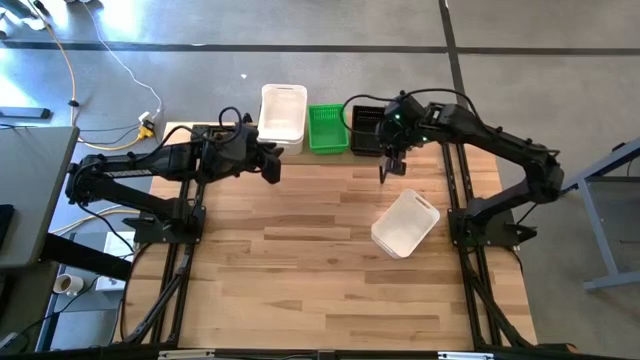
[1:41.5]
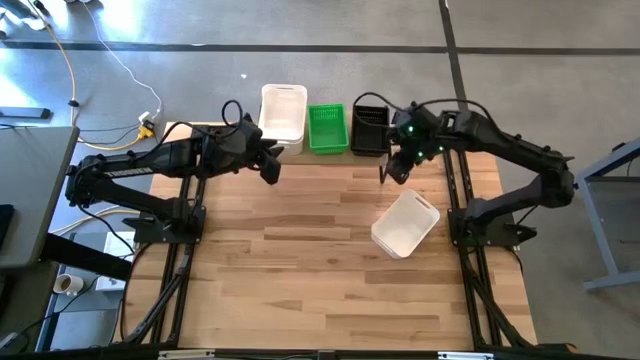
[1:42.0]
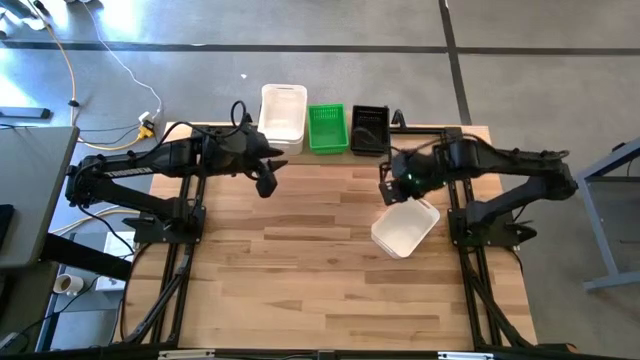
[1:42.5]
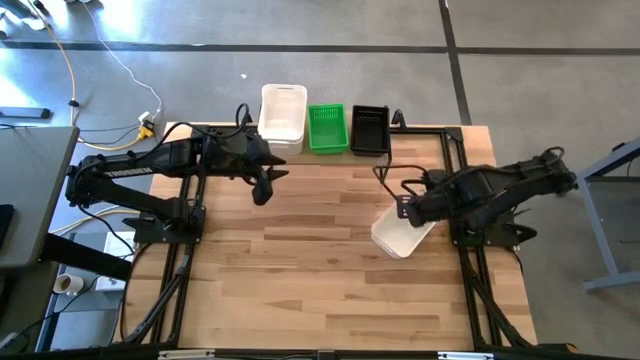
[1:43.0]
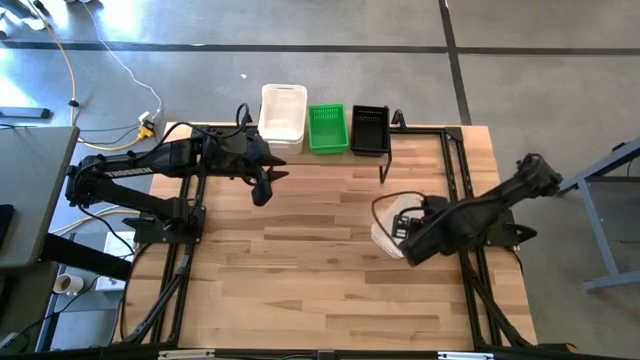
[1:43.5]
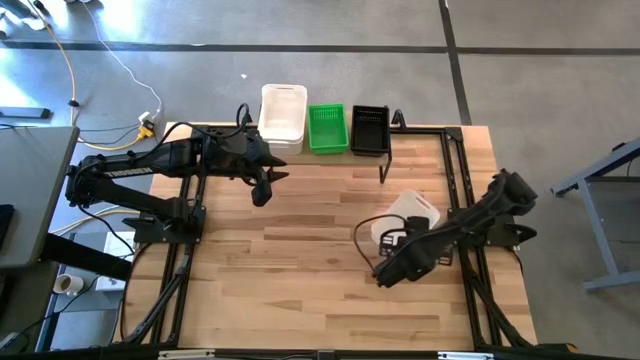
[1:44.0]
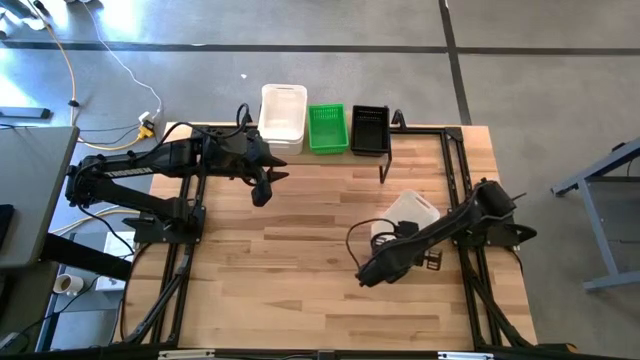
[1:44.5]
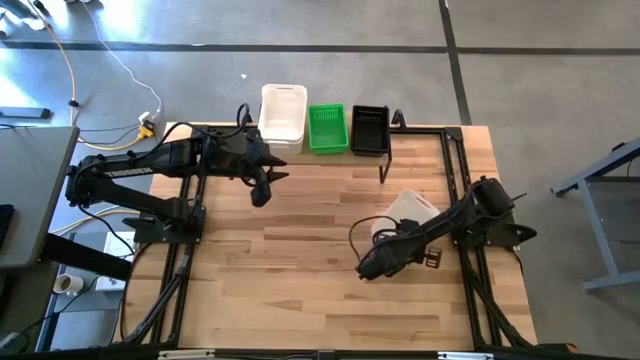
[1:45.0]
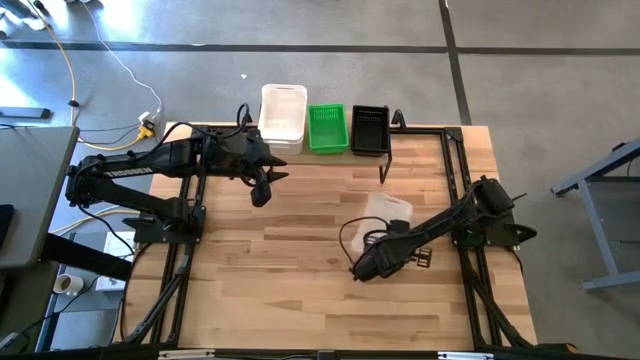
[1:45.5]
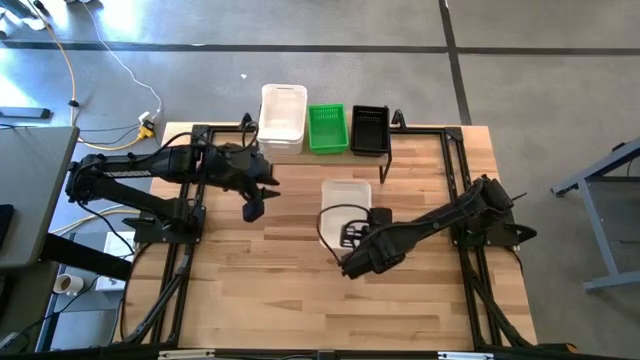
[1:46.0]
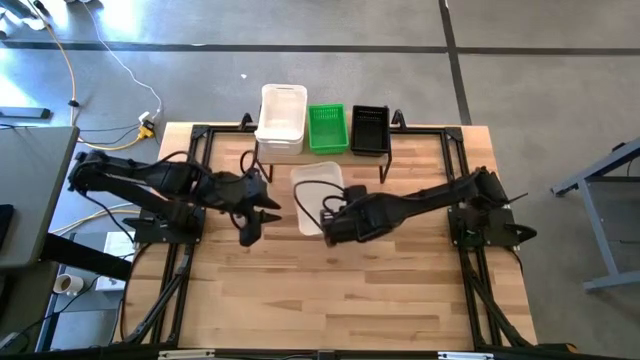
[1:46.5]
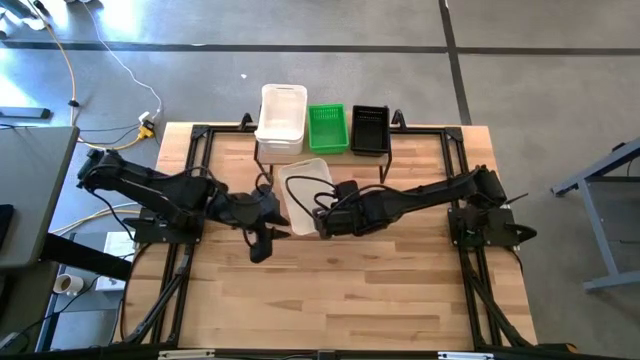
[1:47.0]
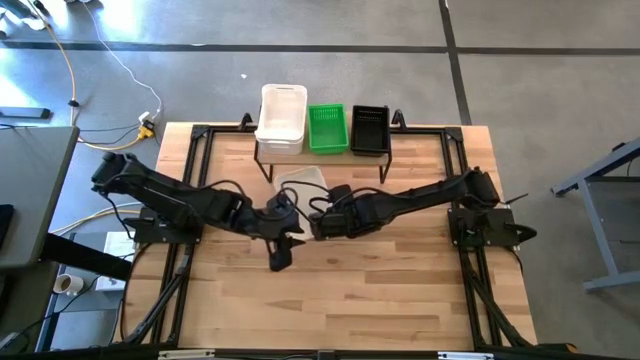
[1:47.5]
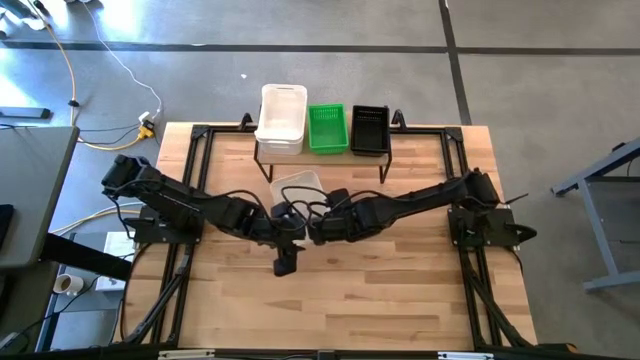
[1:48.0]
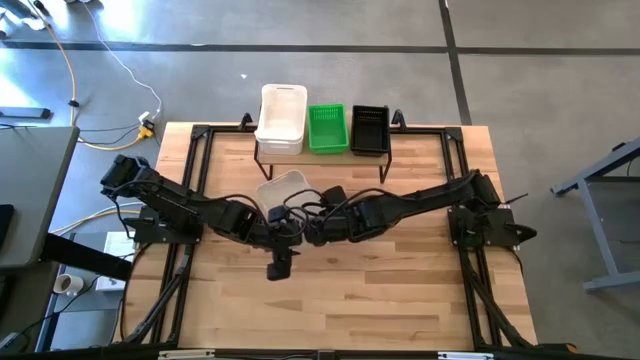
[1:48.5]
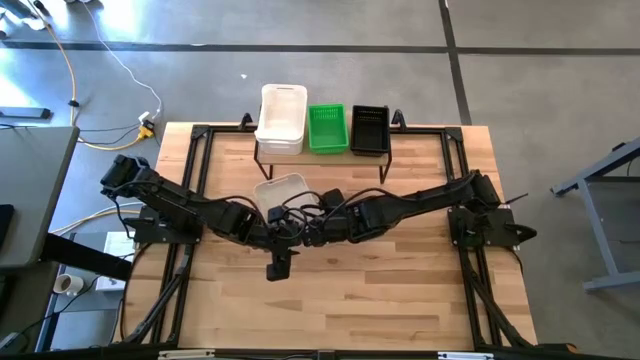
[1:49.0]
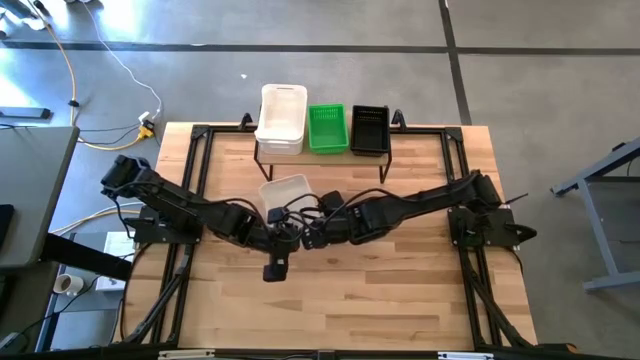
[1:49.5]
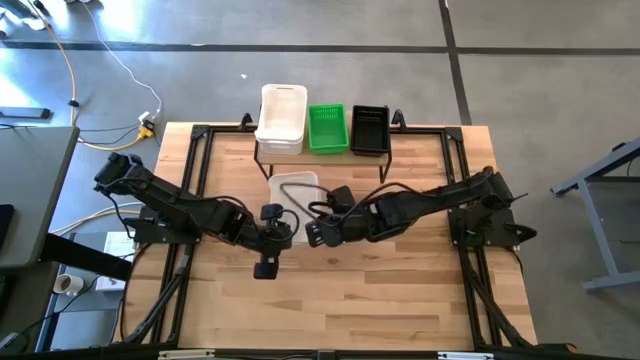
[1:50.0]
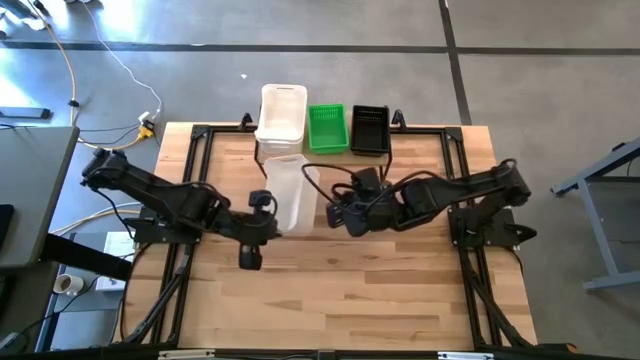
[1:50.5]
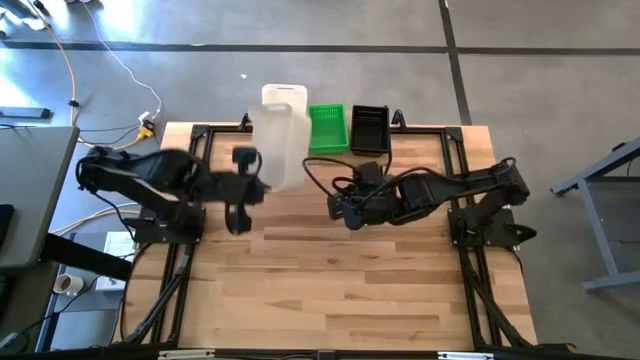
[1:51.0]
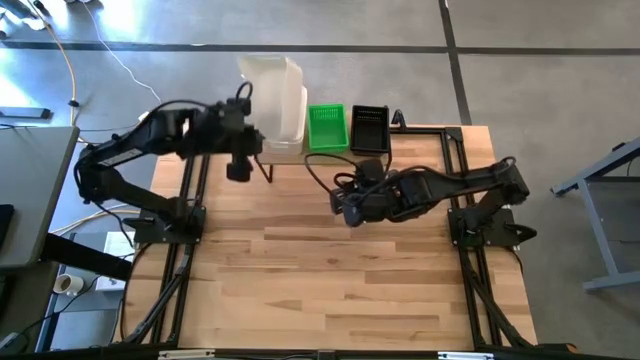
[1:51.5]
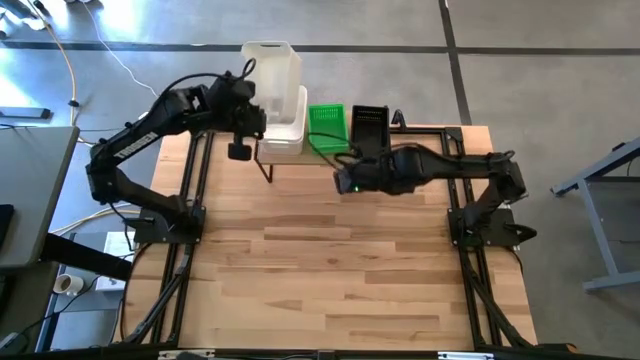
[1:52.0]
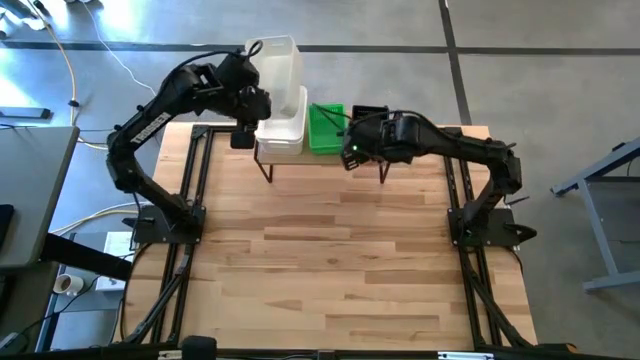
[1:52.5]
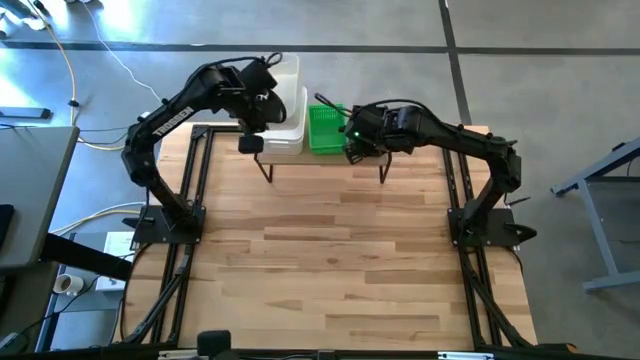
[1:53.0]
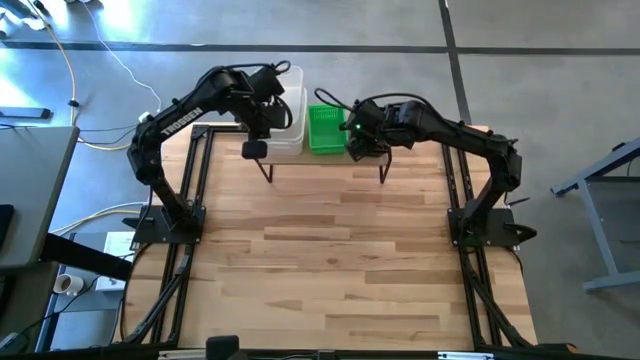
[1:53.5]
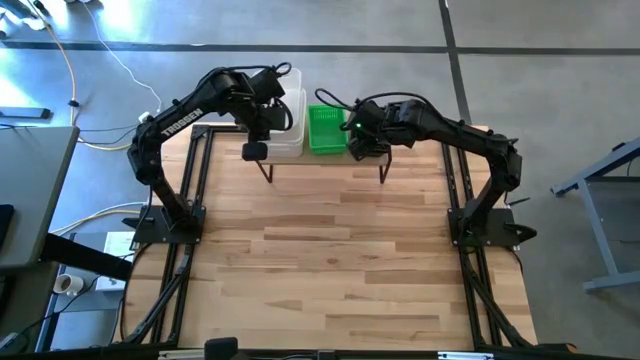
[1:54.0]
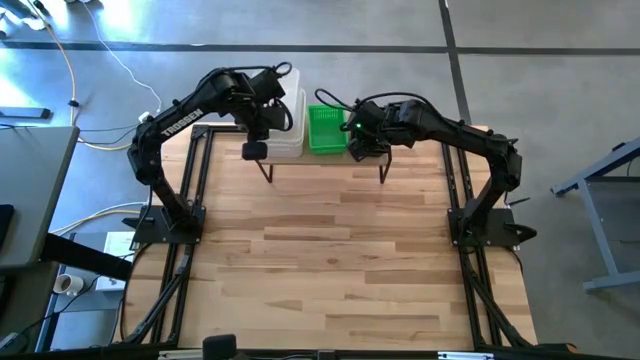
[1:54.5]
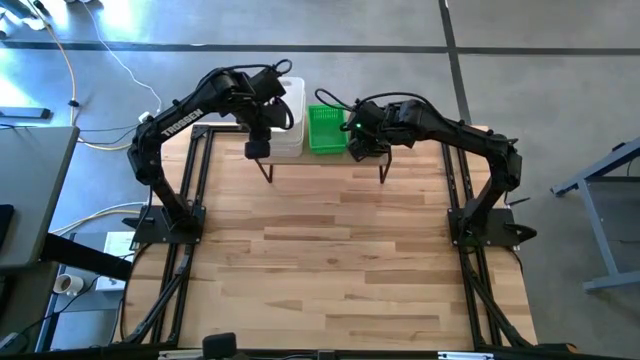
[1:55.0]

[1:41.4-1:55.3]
Task: Stack baskets on shelf by color
Stack the white bin on top of the white bin

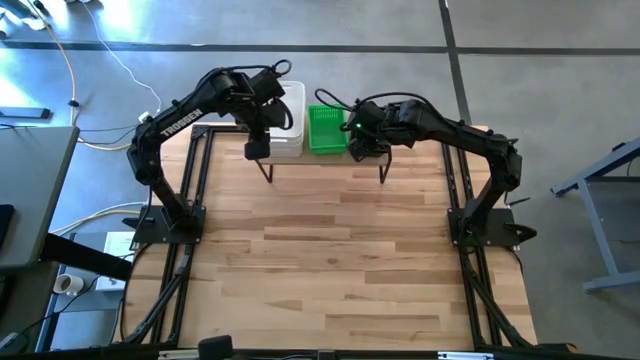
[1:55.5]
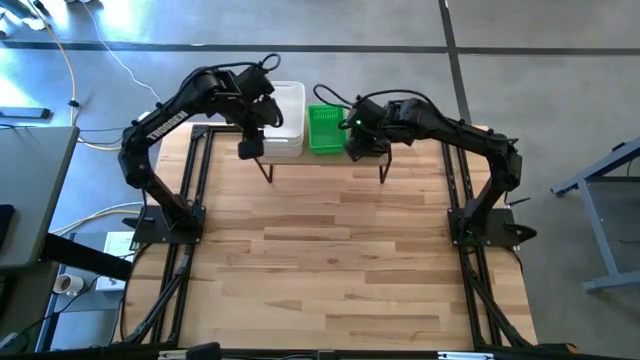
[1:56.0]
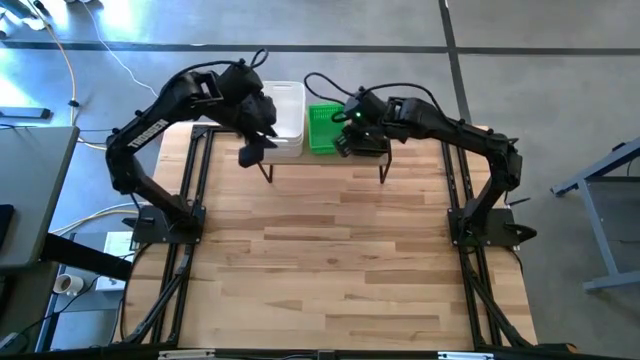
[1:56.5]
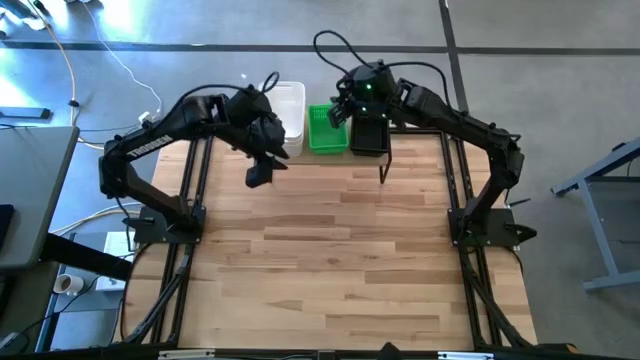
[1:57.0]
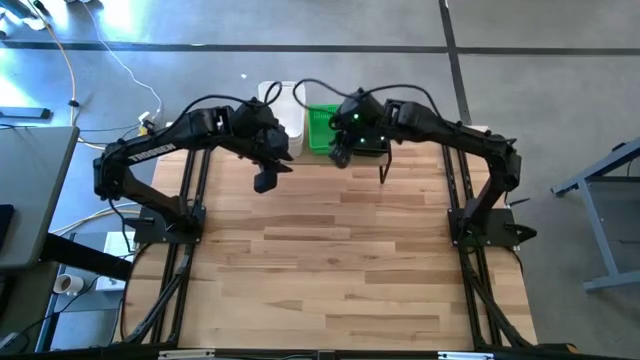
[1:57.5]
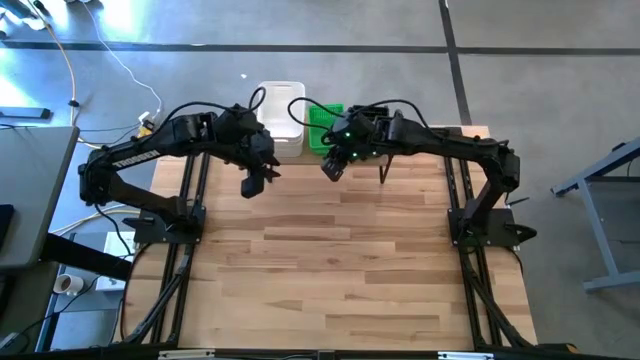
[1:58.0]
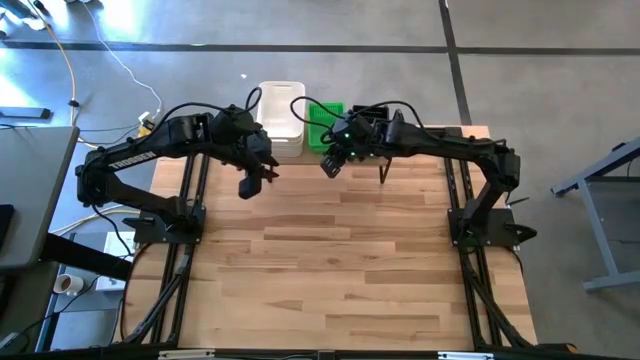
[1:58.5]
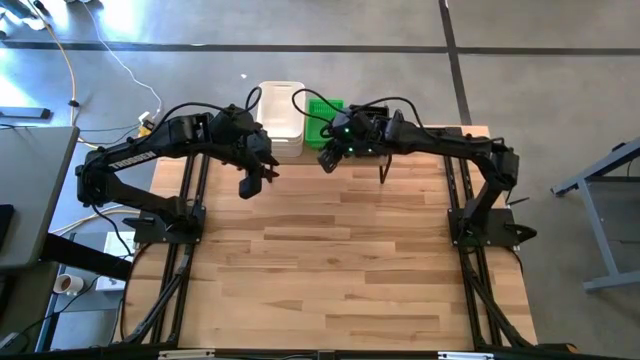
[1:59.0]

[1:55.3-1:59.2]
Adjust the stacked green bins on the shelf

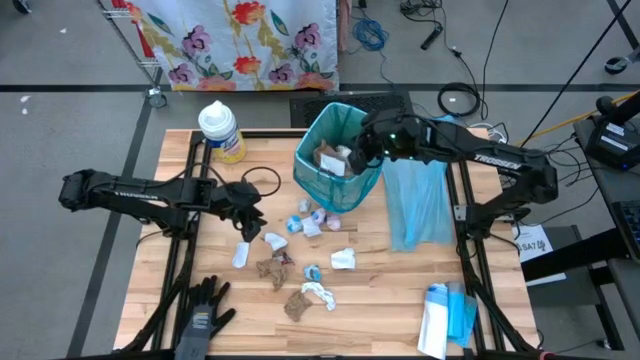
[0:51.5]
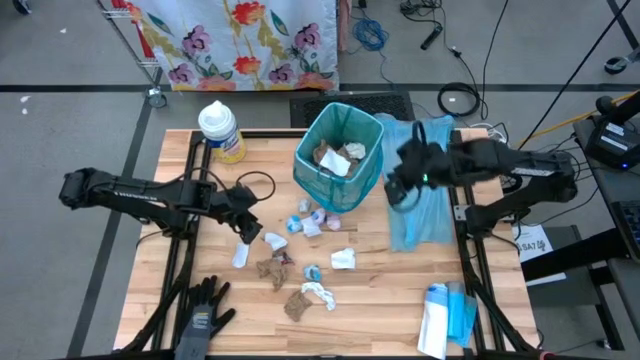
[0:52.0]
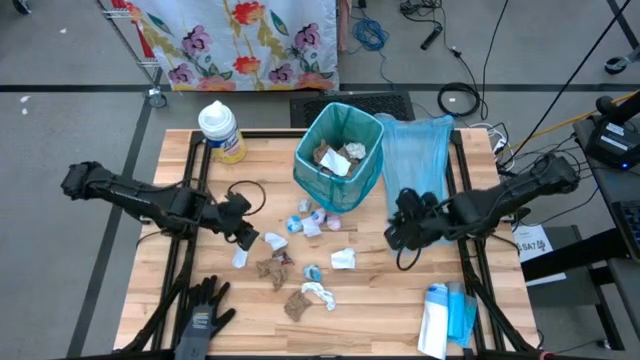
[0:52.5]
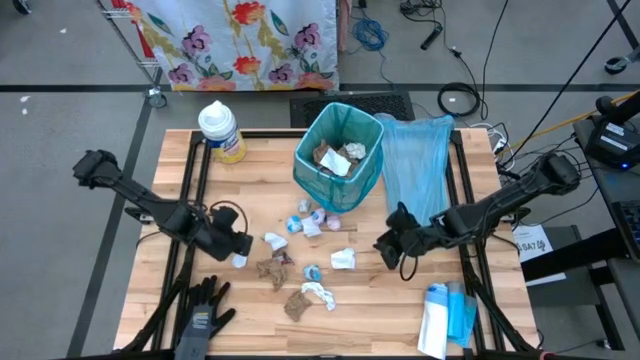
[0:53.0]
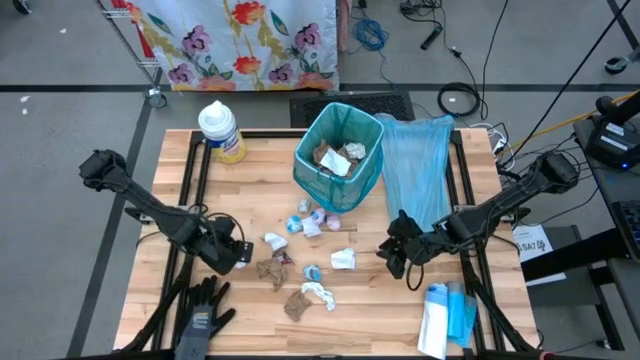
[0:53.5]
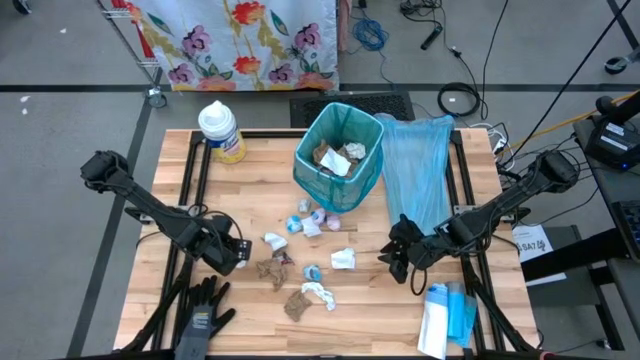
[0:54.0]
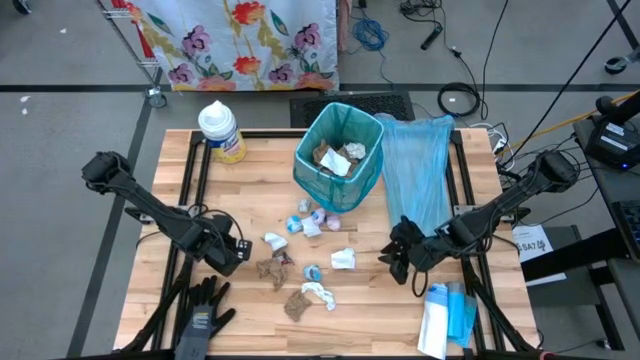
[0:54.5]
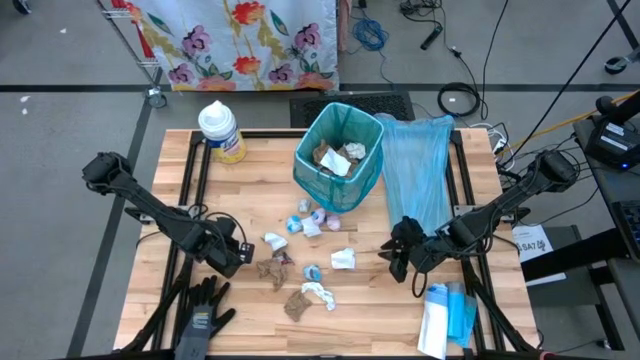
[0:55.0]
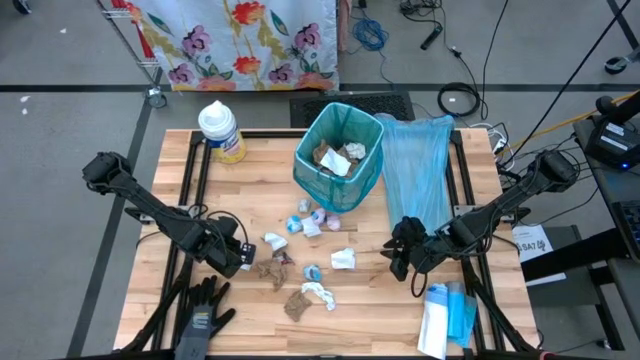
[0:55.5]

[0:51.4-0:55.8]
Task: place trash/remove bag and relplace
Put the white paper piece into the trash bin
